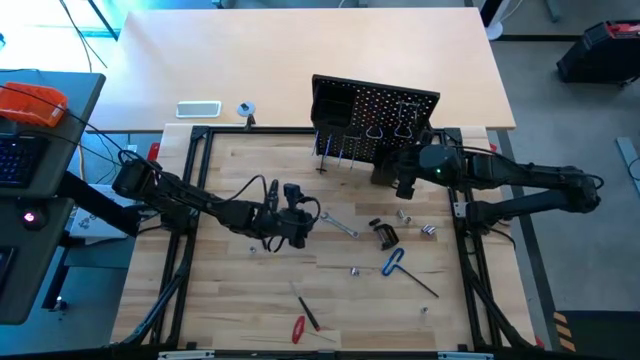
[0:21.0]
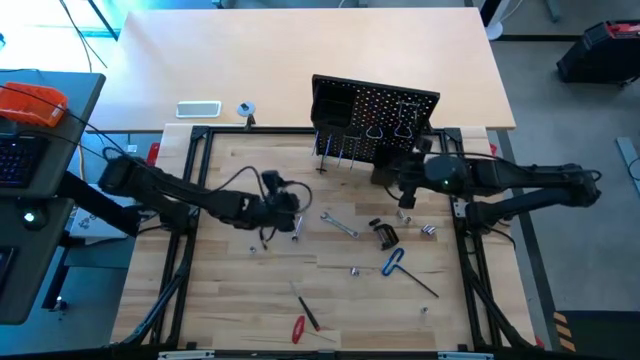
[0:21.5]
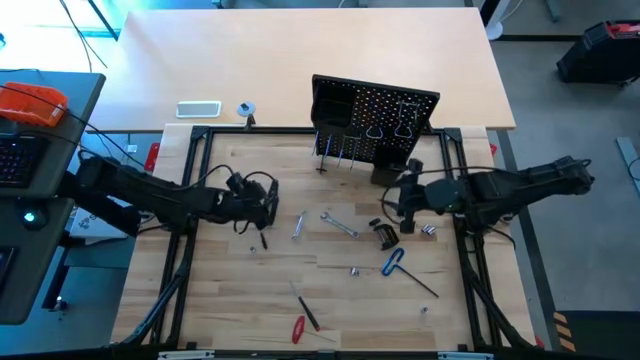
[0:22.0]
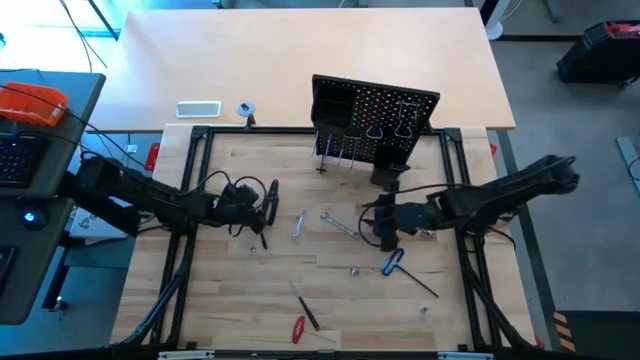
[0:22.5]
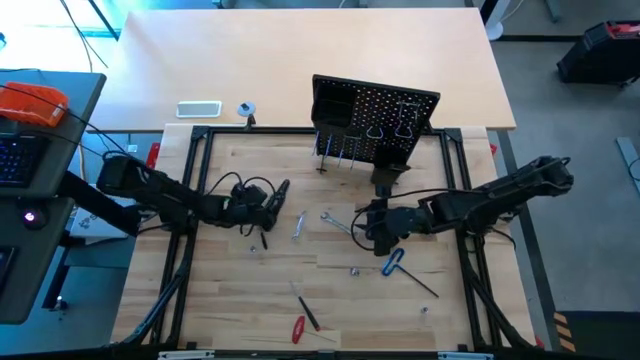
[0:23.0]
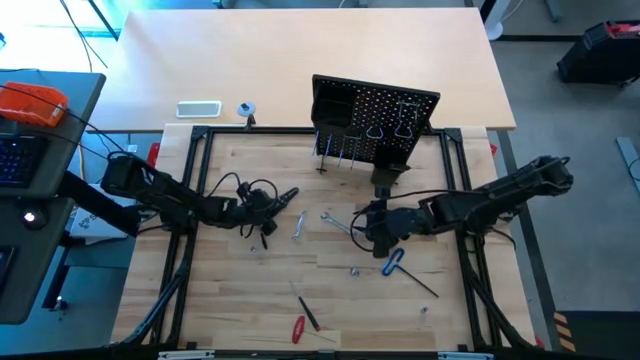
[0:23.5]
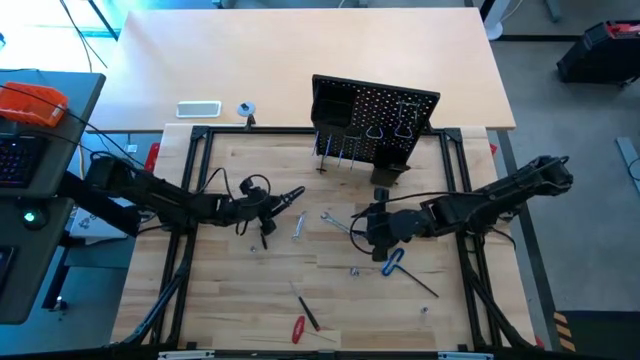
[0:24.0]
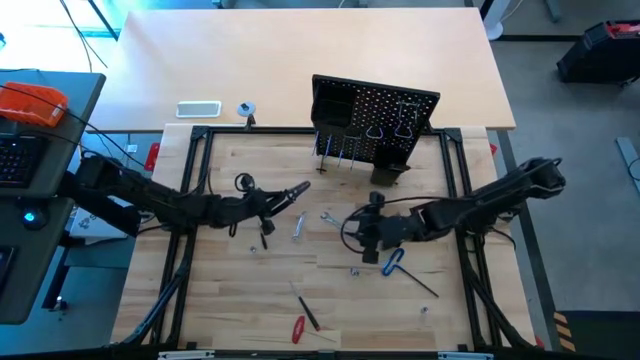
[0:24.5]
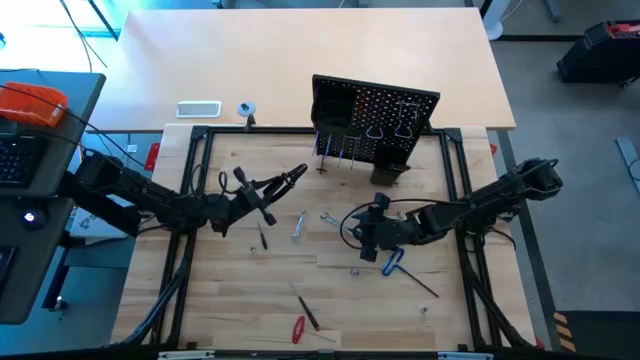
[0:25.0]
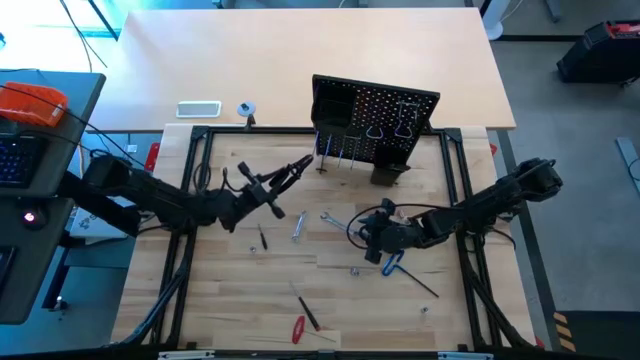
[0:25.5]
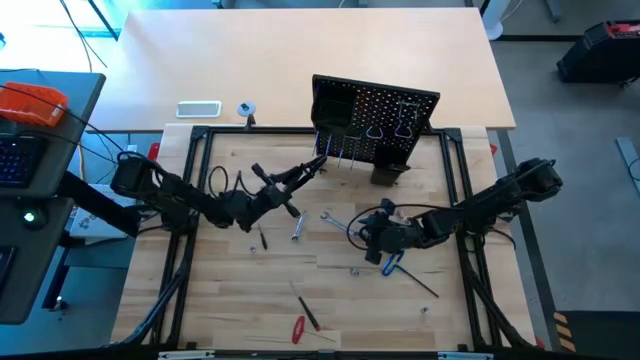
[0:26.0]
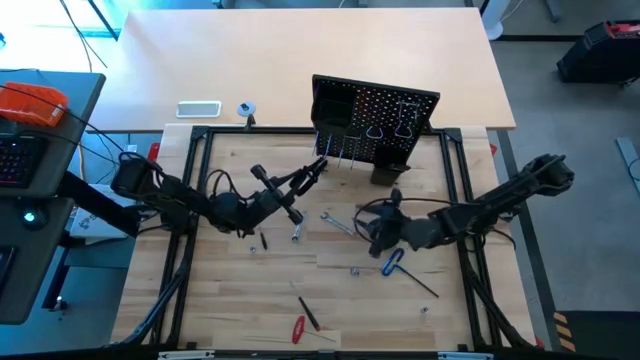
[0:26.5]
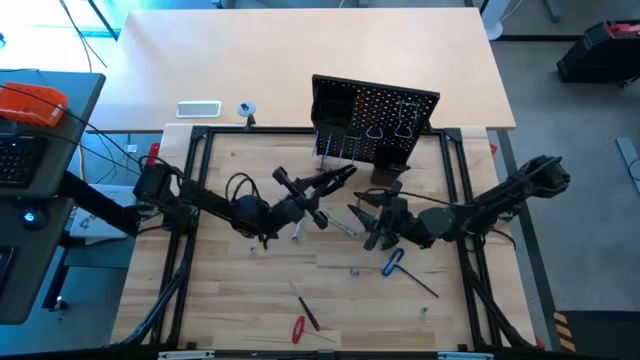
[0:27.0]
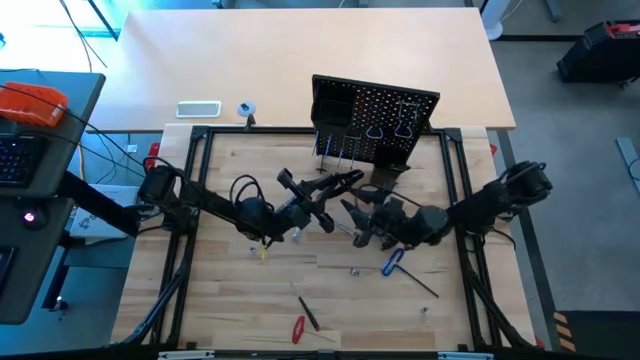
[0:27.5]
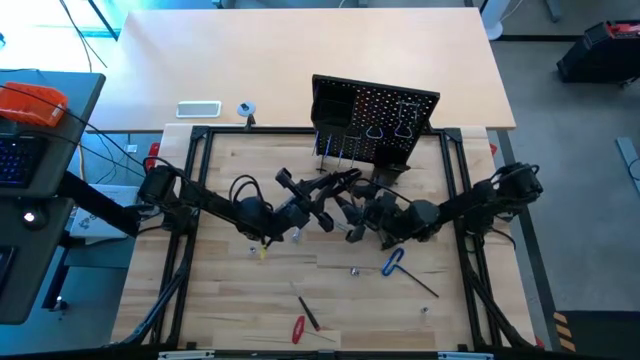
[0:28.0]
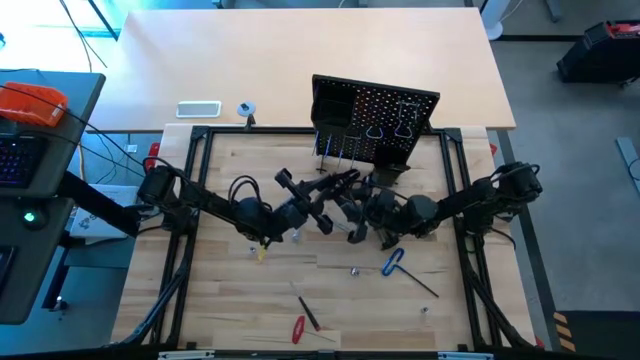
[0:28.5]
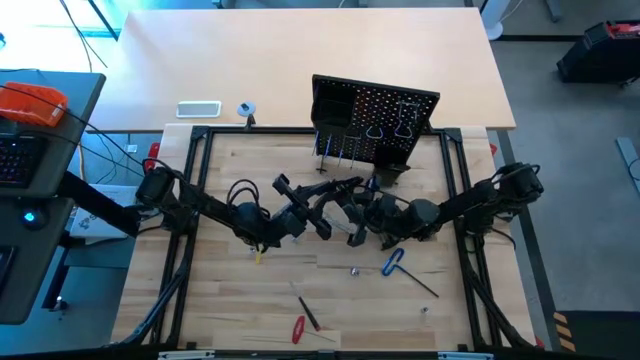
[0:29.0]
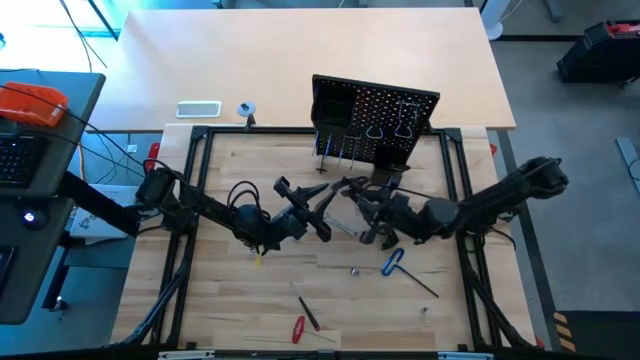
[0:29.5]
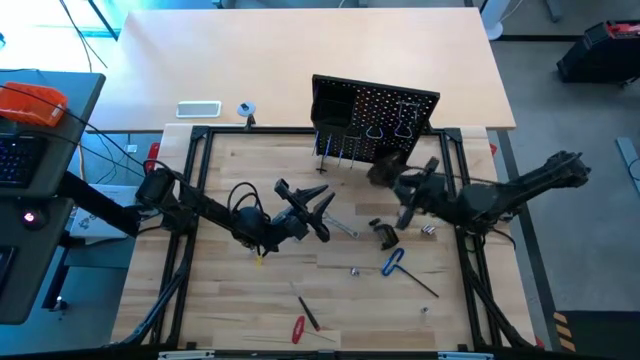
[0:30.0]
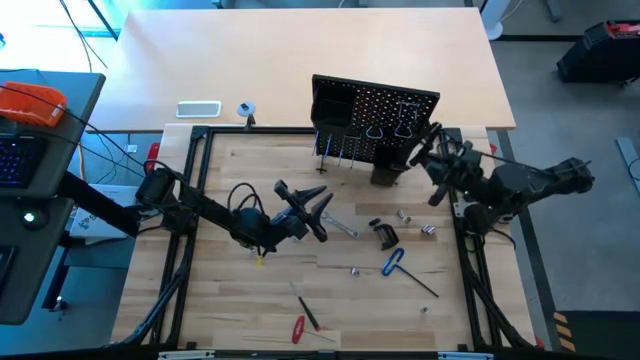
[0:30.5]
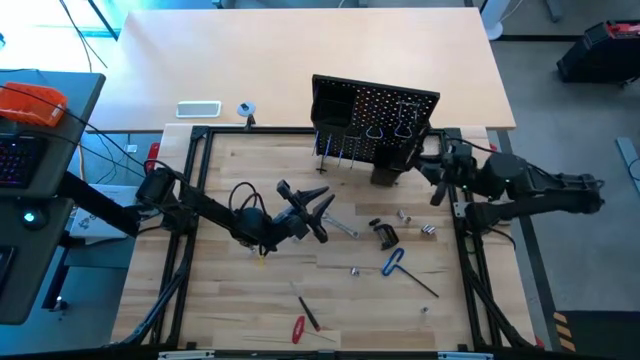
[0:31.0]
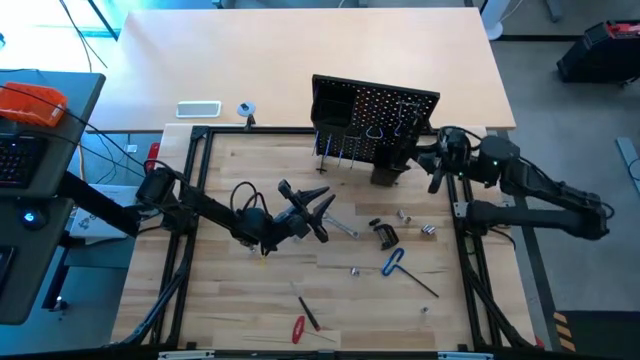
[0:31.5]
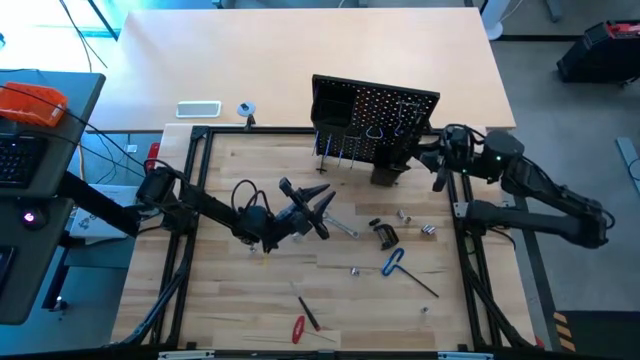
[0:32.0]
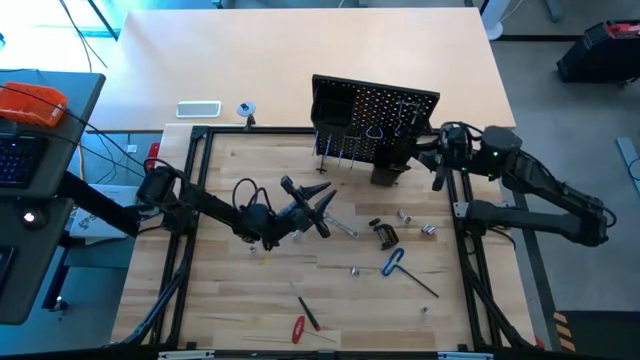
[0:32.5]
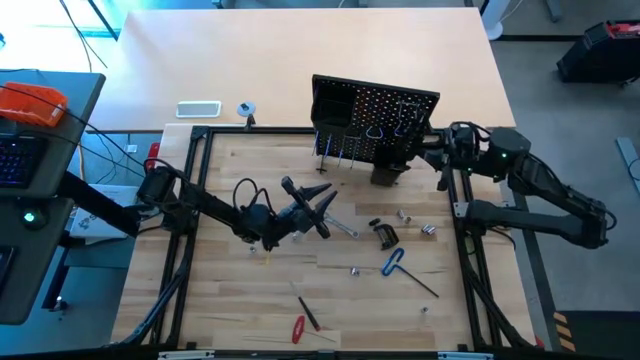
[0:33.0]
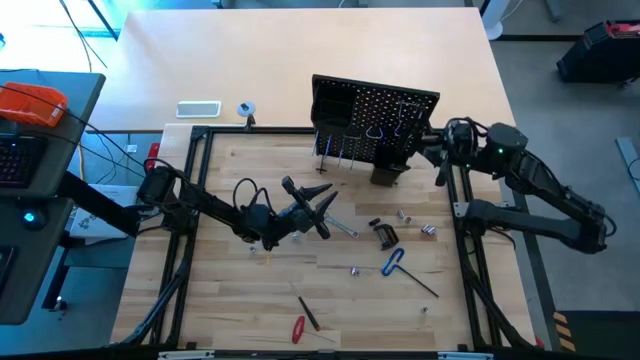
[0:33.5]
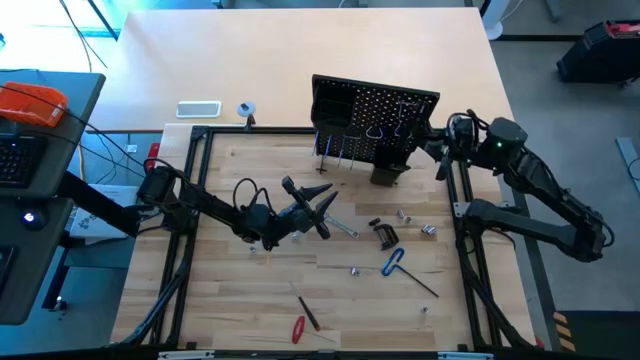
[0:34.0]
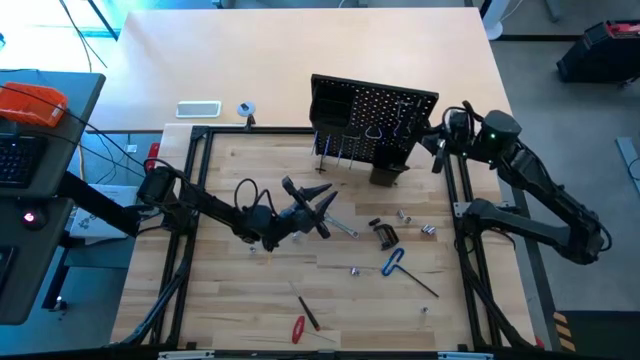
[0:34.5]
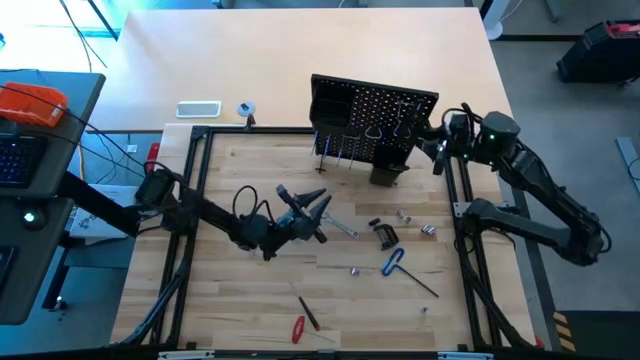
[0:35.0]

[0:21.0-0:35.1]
Task: Hang tools onto peg board
Hang the black wire strippers onto the pegboard

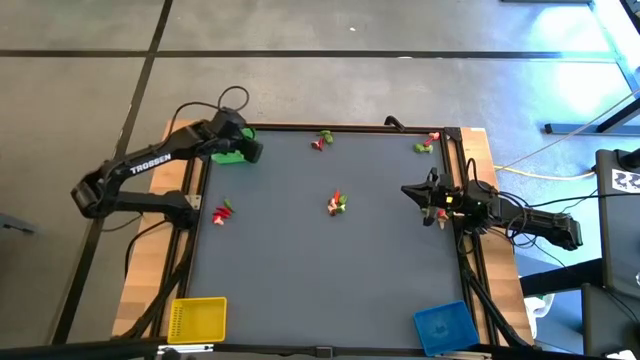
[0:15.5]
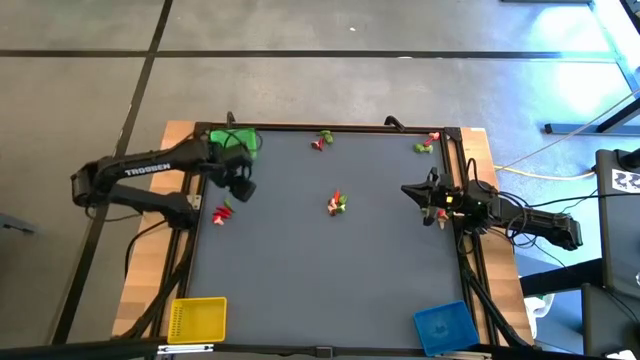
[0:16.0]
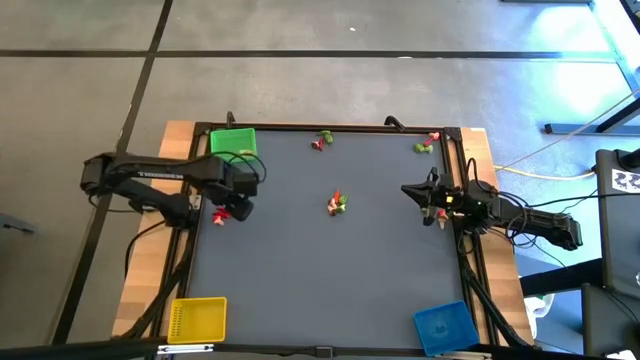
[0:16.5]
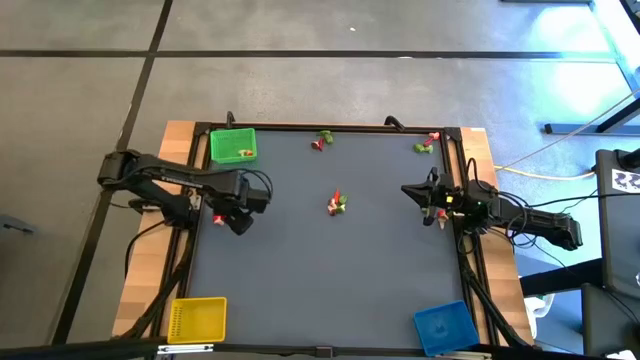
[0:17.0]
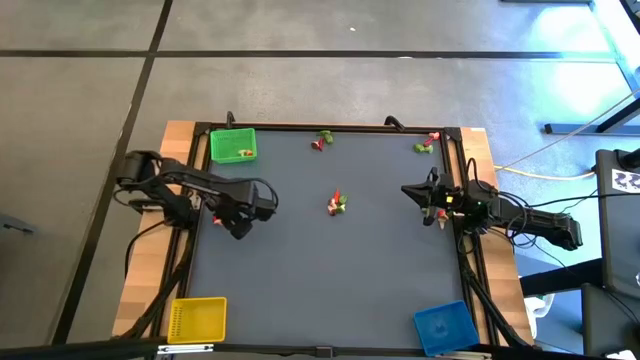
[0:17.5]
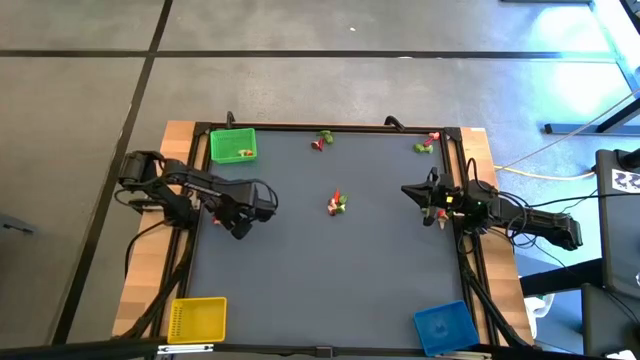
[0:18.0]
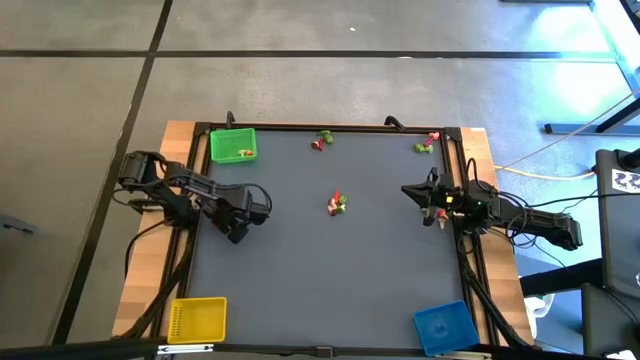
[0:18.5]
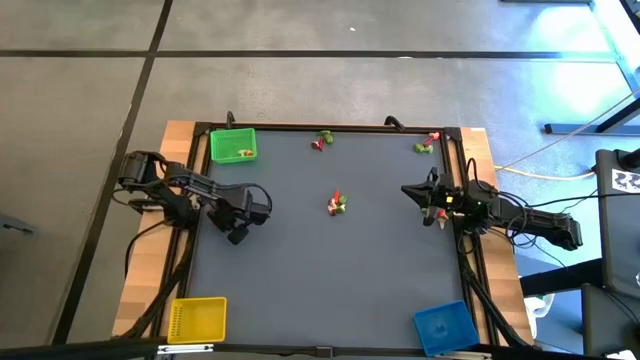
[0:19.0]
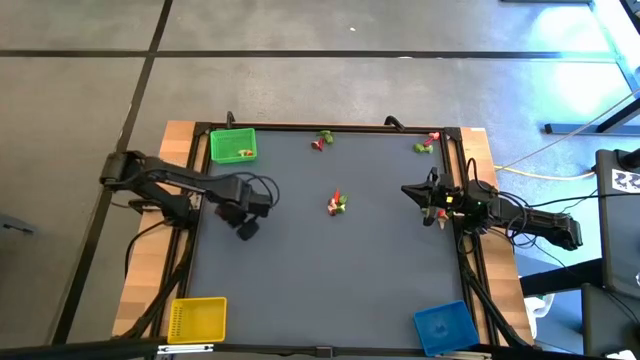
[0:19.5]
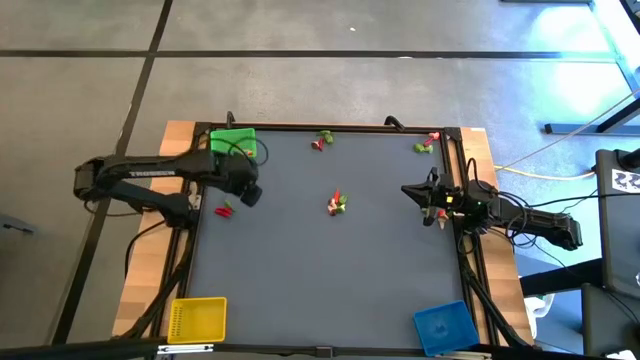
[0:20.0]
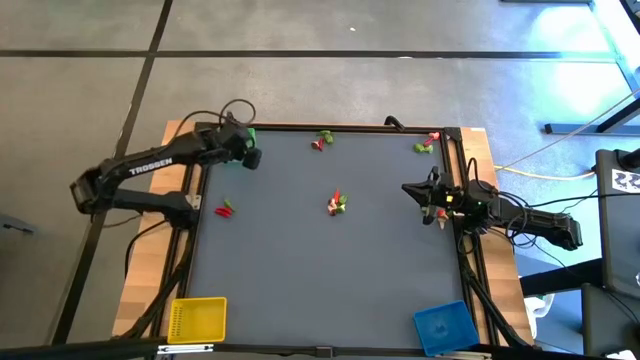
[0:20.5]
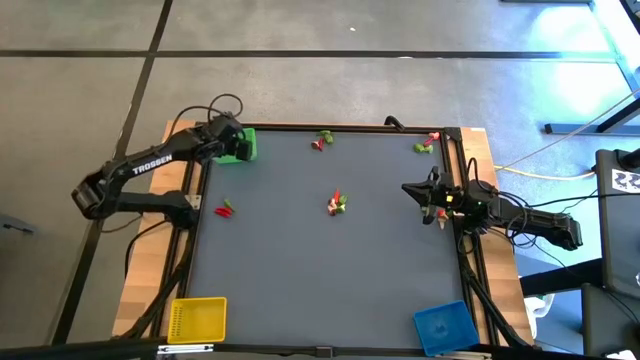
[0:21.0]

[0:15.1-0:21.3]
Task: Sort produce into baskets
Put the red mushroom into the green bin
